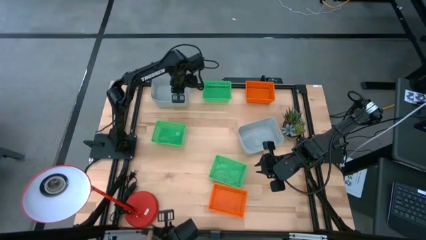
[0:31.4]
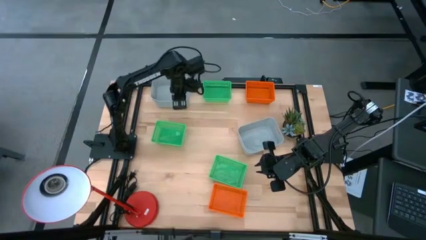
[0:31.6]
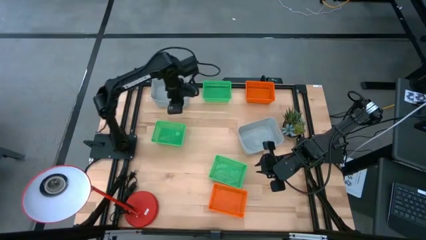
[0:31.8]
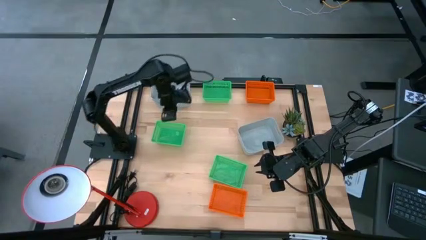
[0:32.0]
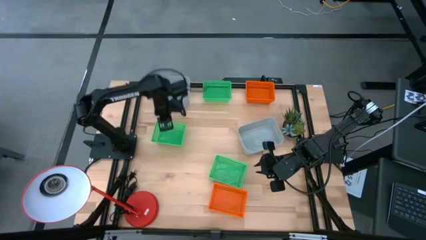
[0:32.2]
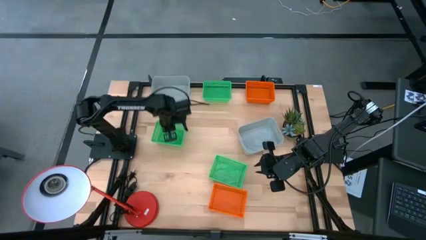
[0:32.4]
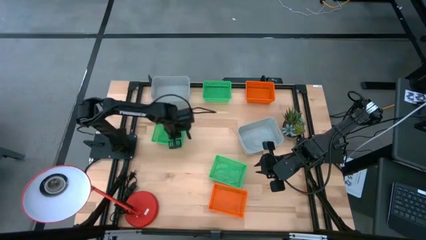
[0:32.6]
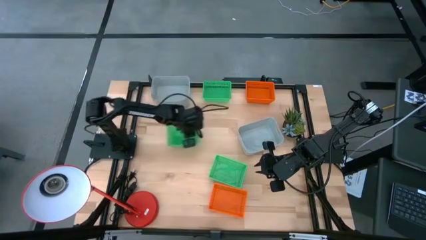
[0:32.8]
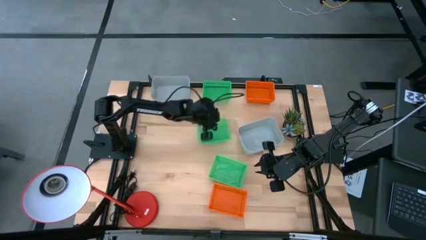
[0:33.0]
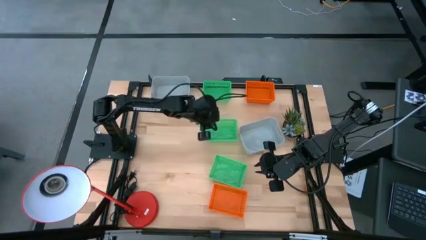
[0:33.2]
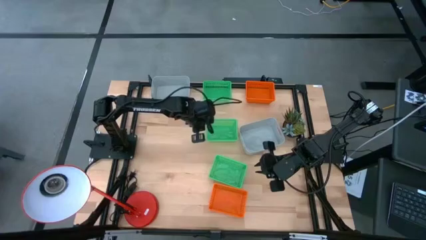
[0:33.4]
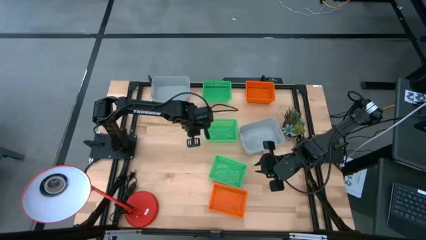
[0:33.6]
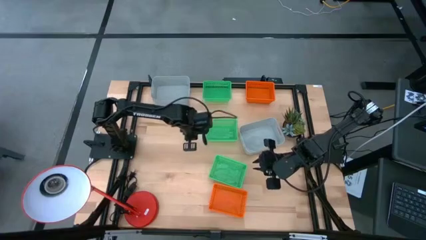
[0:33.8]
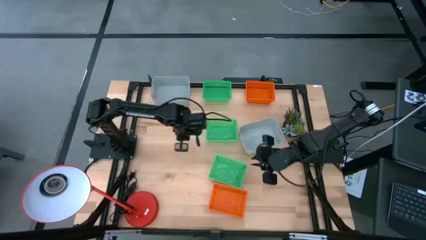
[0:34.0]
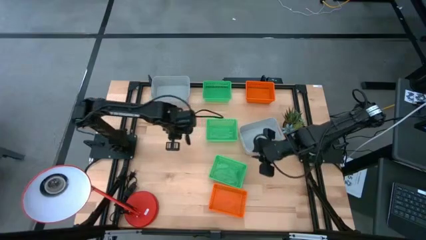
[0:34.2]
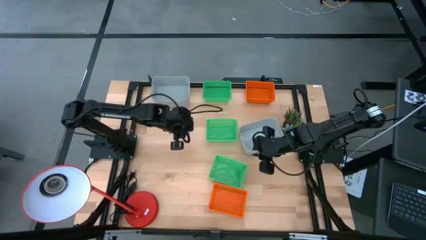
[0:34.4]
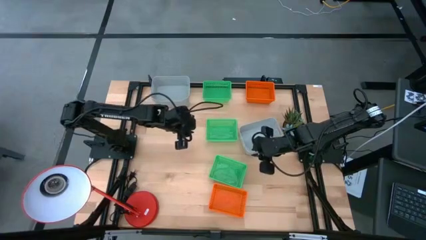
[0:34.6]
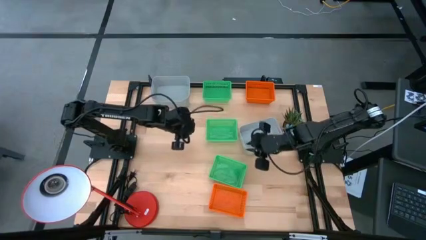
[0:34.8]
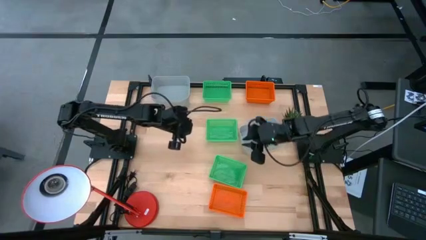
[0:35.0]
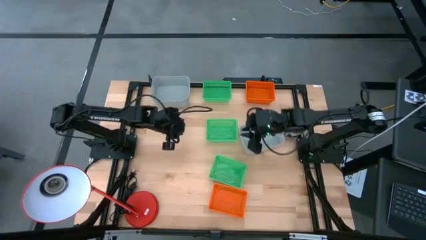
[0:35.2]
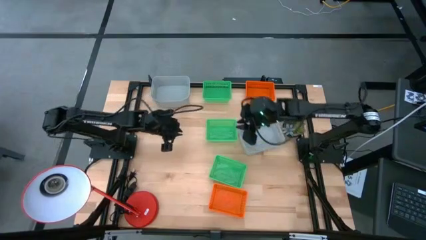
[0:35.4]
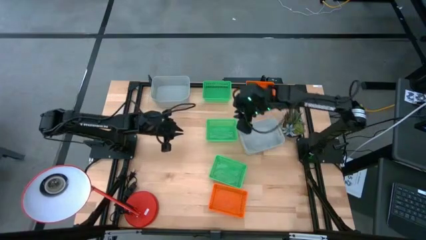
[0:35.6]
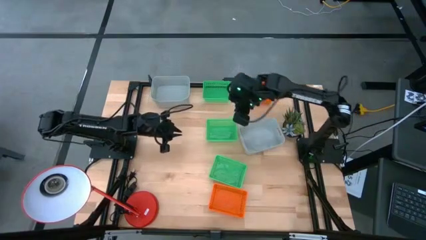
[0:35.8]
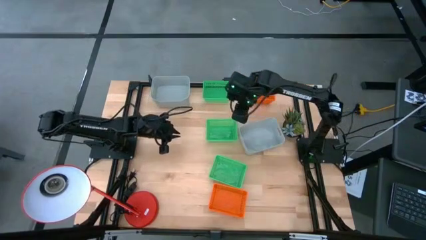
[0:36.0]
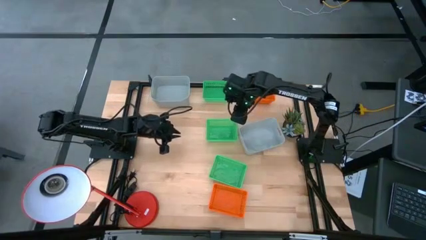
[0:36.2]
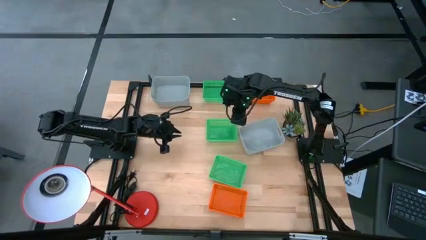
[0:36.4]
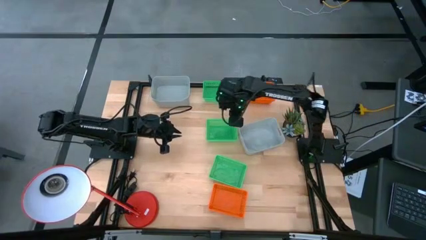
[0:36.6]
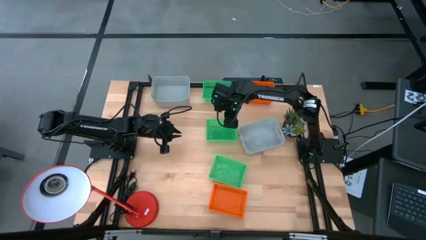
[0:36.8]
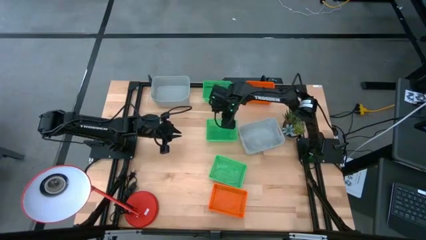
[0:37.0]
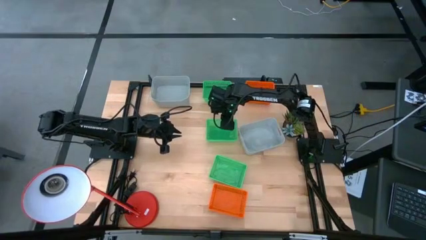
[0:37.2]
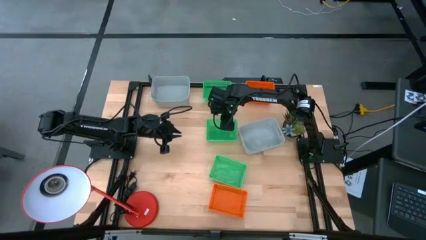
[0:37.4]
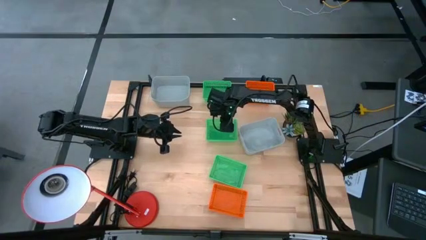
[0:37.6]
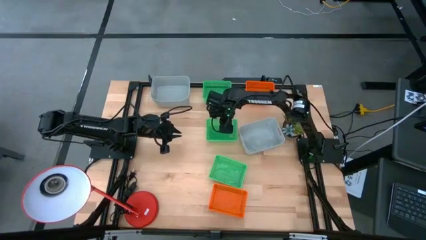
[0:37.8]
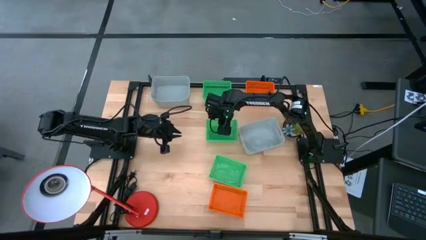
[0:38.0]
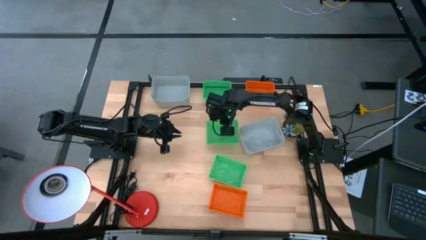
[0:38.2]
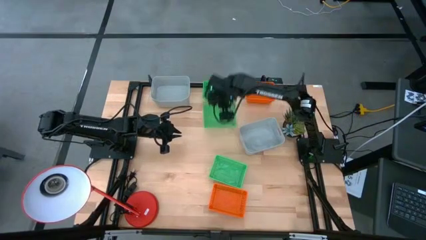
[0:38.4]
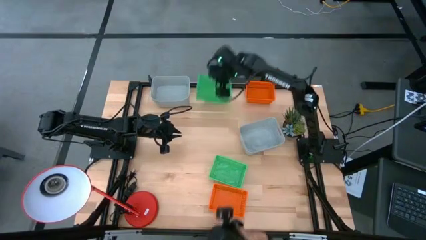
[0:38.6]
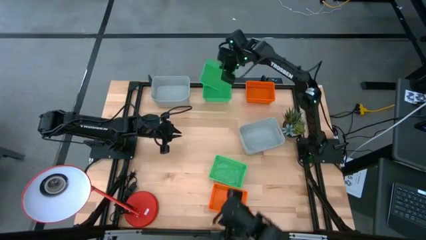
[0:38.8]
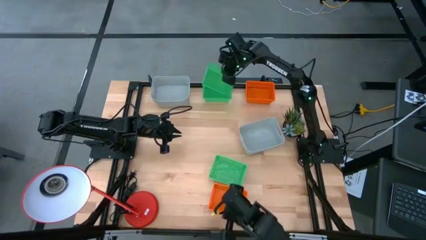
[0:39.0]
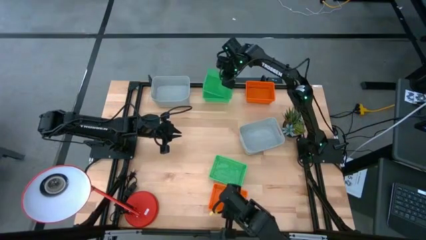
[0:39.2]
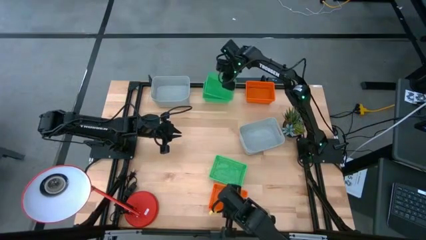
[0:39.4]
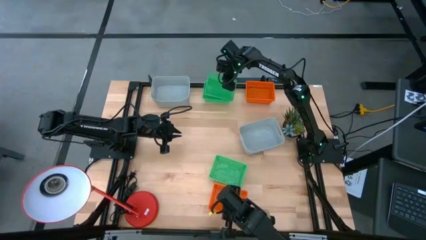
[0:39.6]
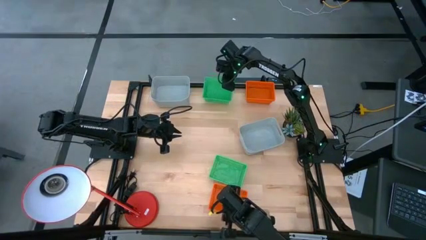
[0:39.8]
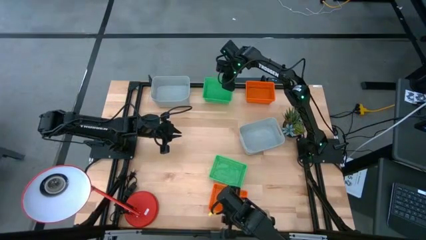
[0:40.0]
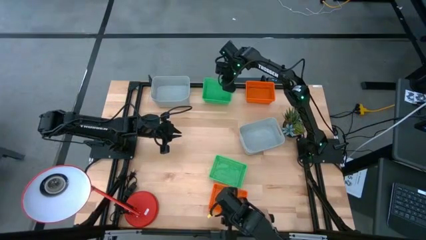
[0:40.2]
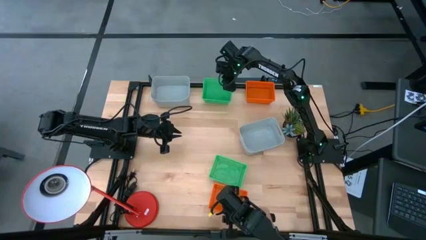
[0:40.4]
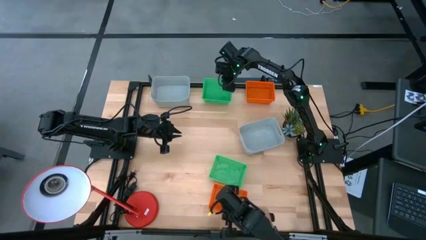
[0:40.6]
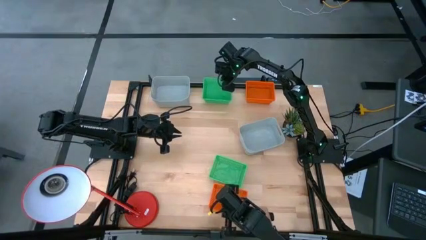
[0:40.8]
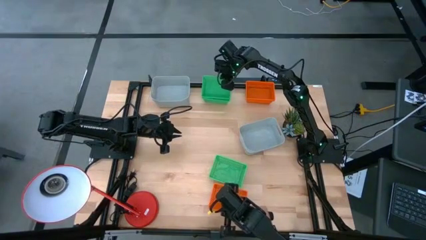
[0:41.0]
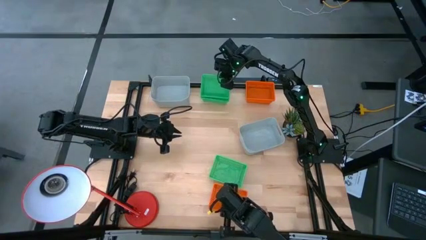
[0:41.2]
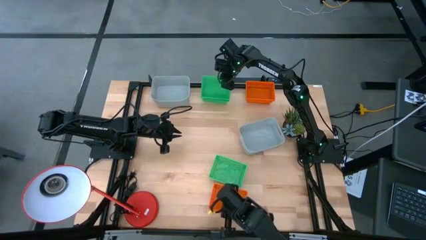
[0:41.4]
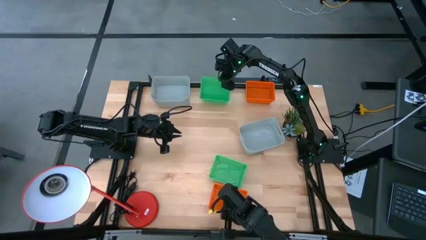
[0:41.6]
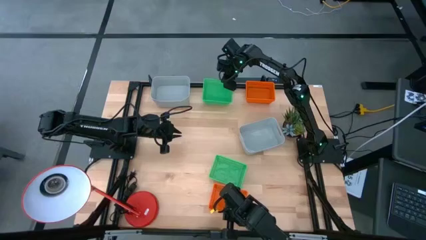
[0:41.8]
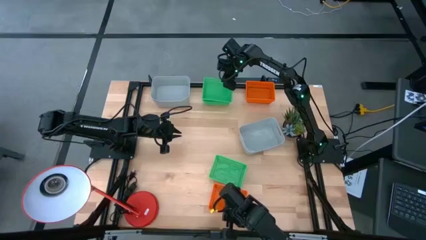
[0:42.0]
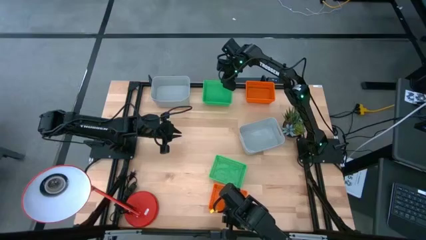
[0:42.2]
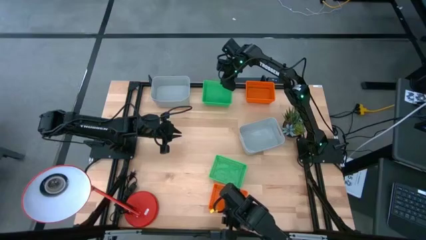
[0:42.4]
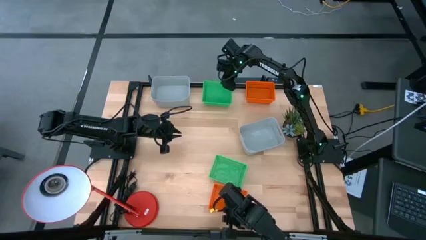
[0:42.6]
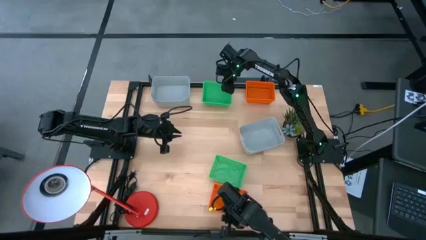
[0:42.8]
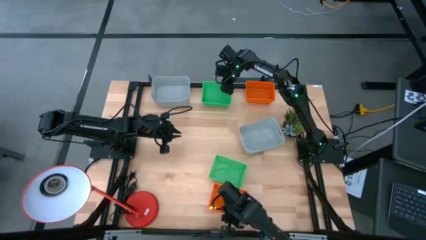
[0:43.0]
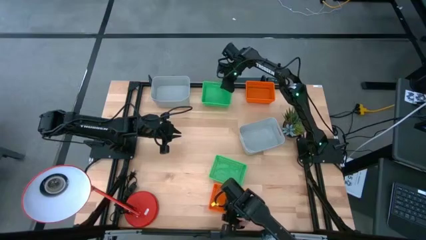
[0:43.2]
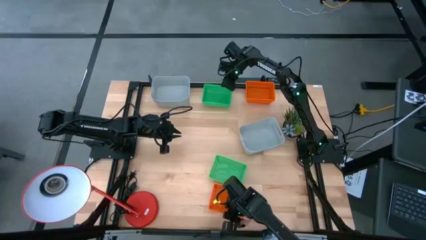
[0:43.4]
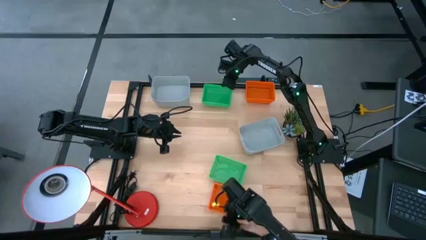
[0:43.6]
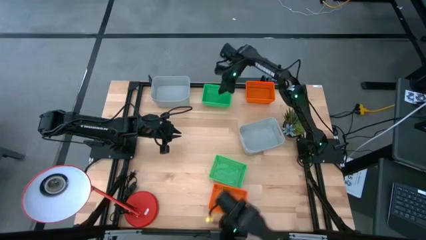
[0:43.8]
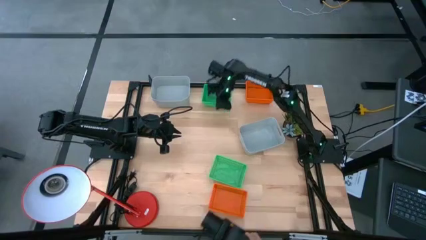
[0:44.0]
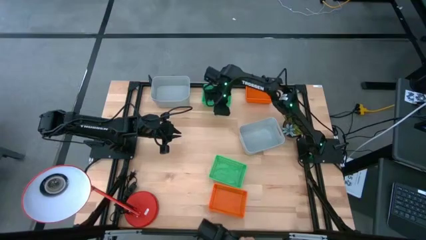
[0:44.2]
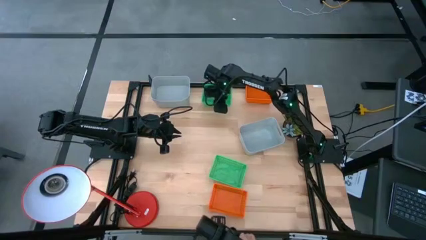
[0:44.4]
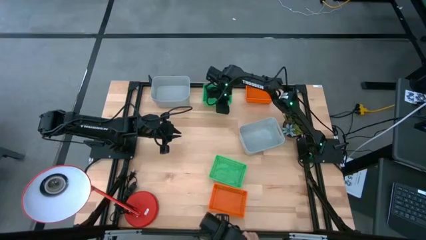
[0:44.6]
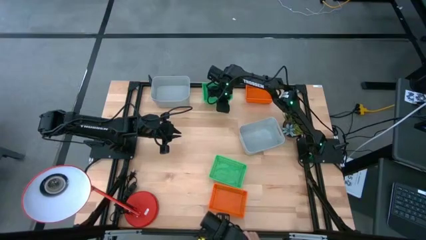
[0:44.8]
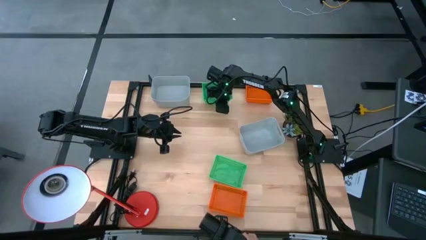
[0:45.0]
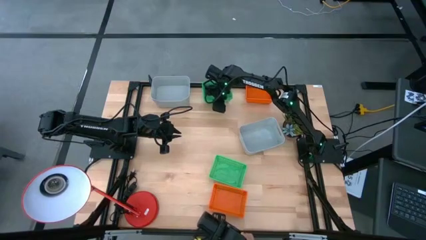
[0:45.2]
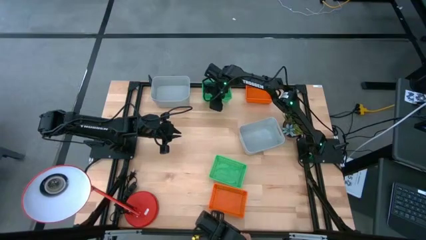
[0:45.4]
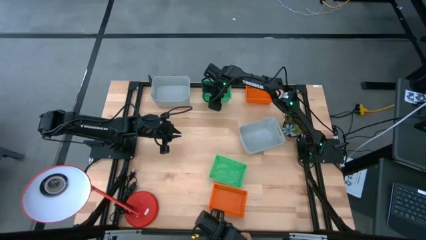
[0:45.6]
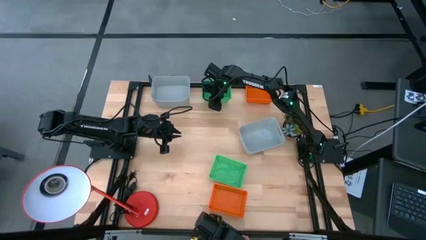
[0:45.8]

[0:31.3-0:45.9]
Stack the middle green bin on top of the top green bin

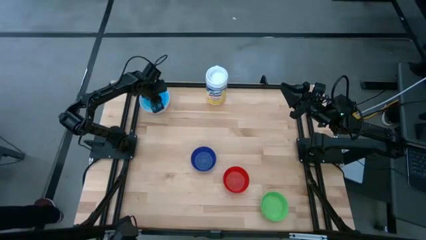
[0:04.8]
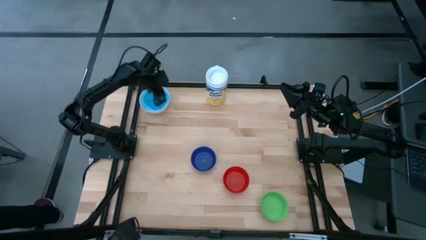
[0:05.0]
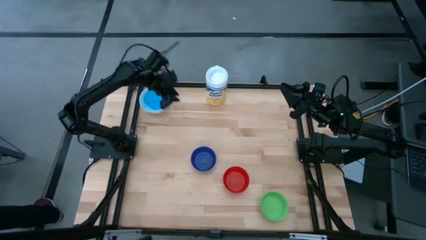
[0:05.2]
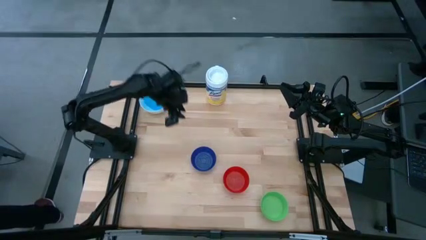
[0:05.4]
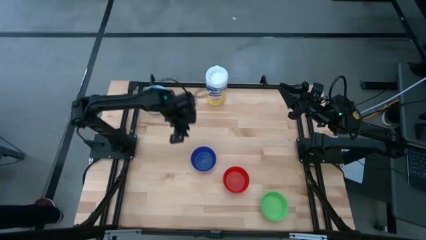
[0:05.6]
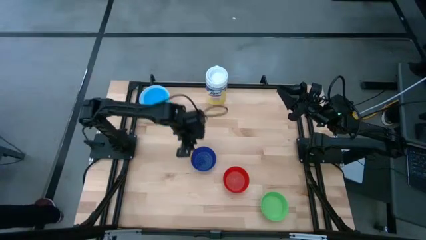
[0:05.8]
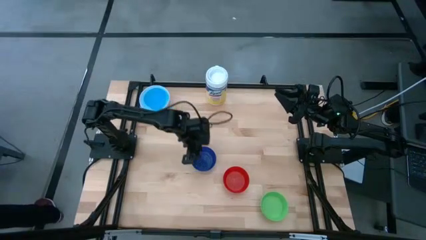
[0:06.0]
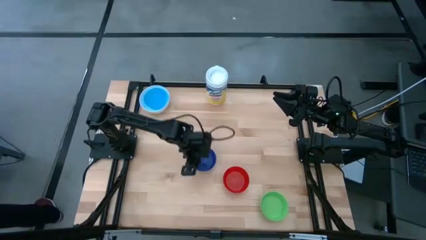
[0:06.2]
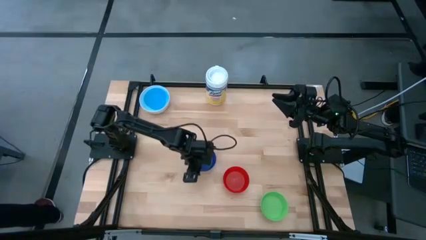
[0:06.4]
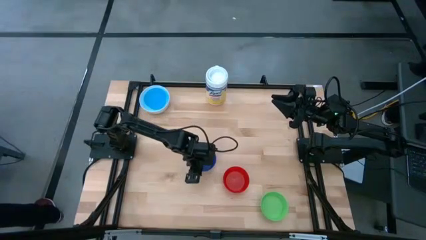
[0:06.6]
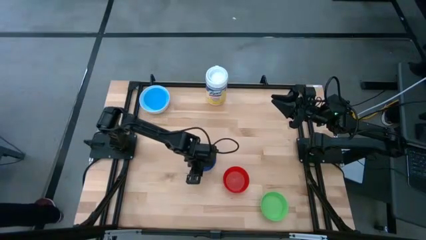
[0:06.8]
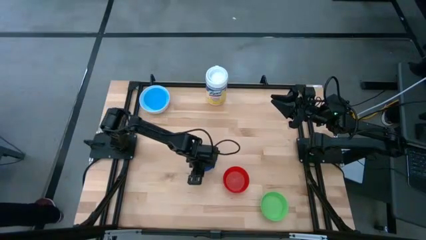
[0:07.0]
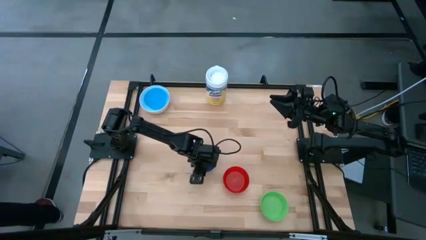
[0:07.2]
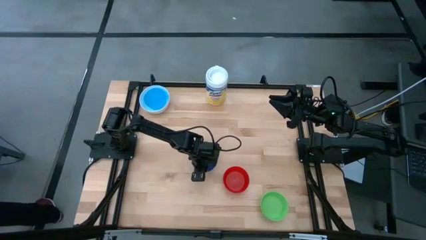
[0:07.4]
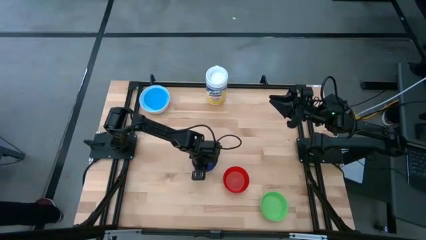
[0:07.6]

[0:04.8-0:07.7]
Stack the dark blue bowl on top of the light blue bowl
